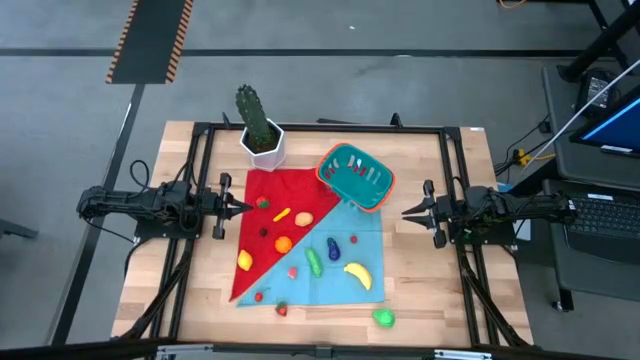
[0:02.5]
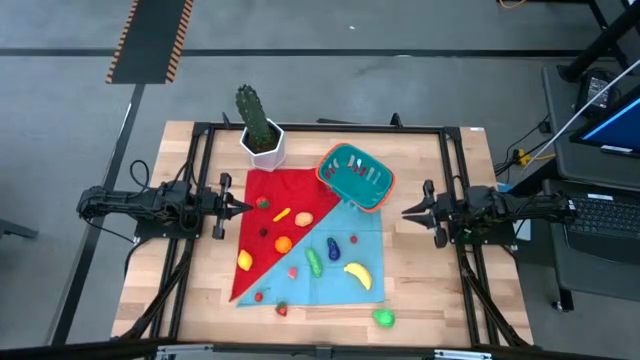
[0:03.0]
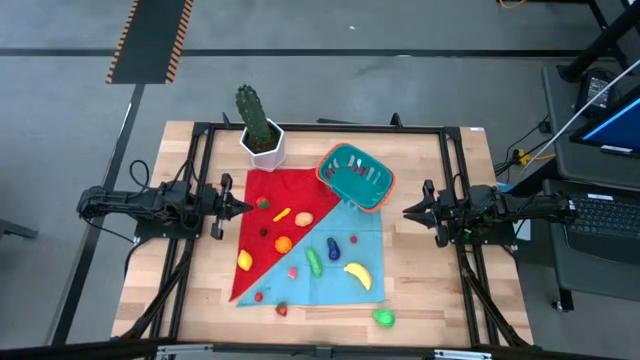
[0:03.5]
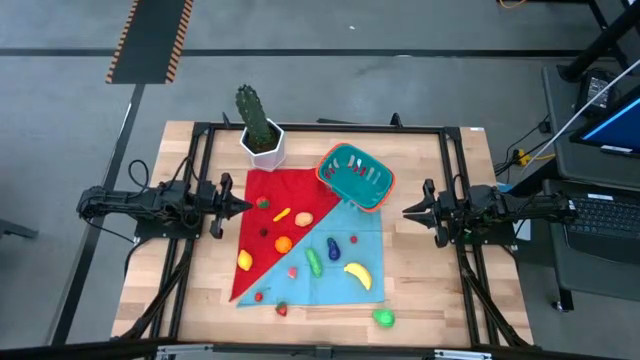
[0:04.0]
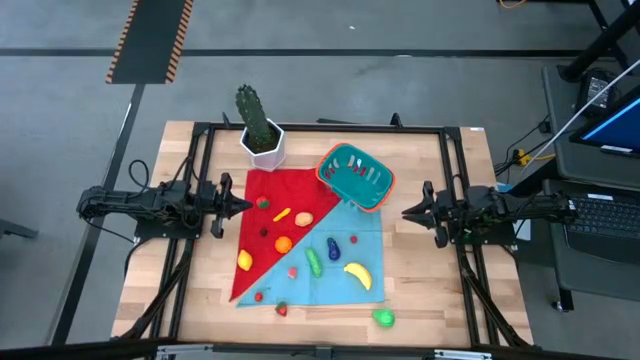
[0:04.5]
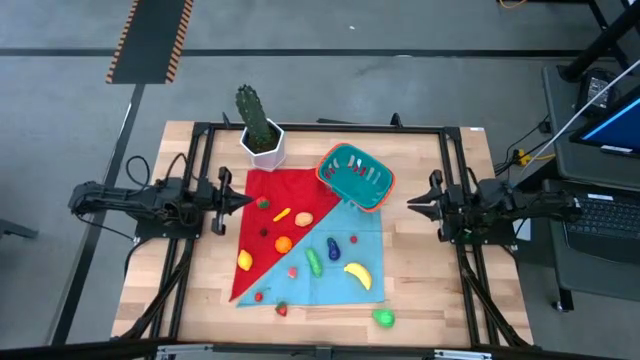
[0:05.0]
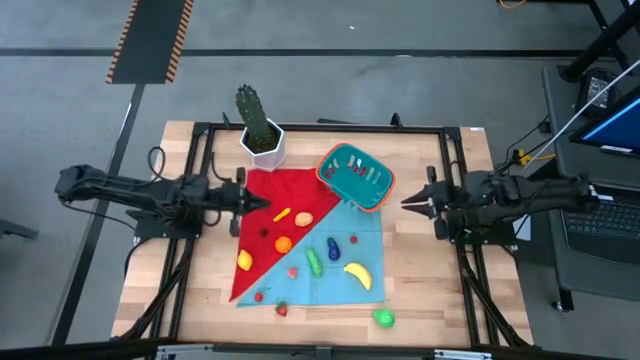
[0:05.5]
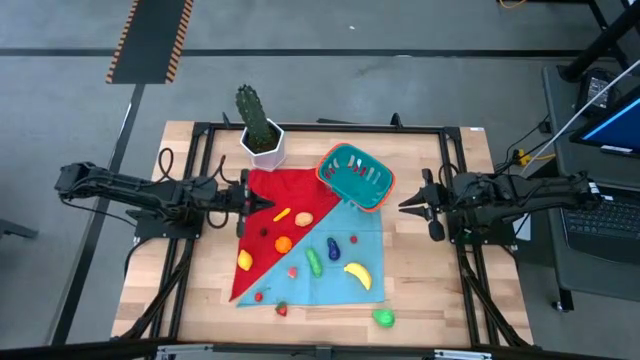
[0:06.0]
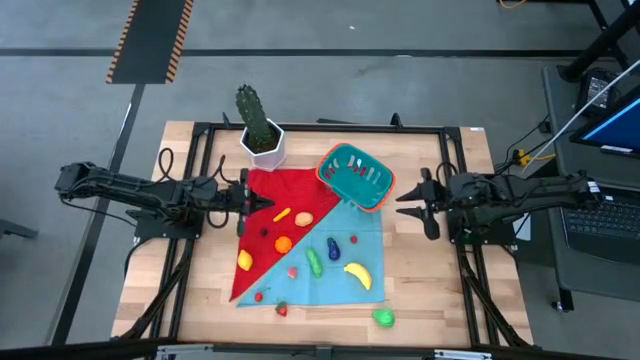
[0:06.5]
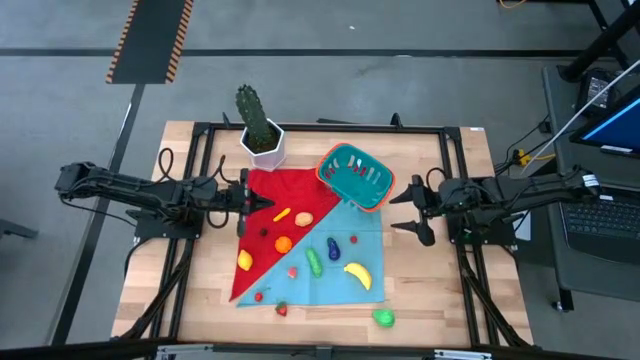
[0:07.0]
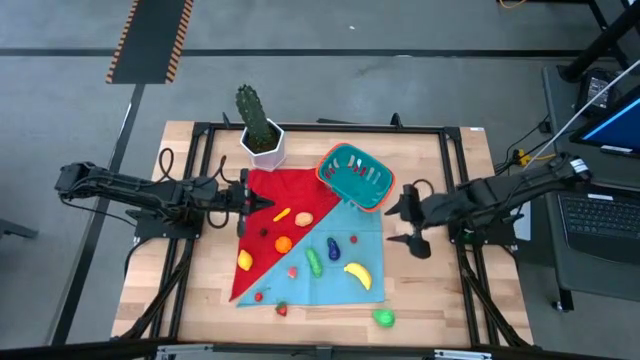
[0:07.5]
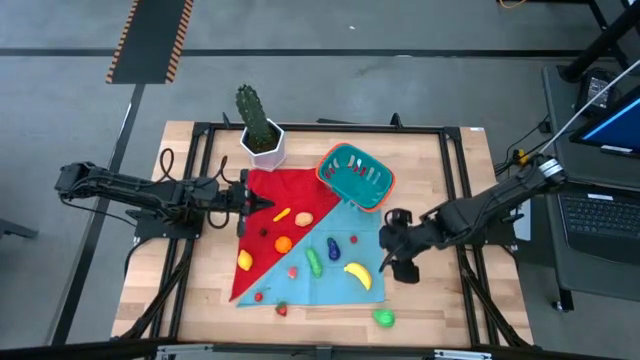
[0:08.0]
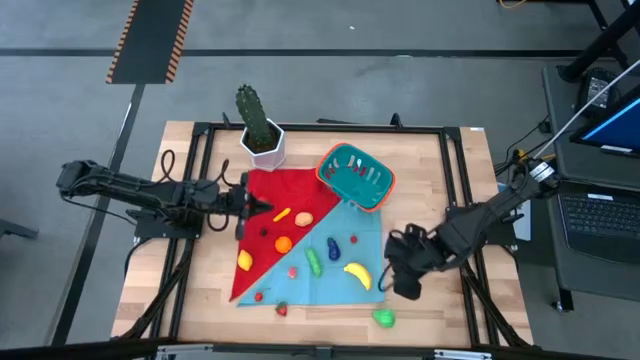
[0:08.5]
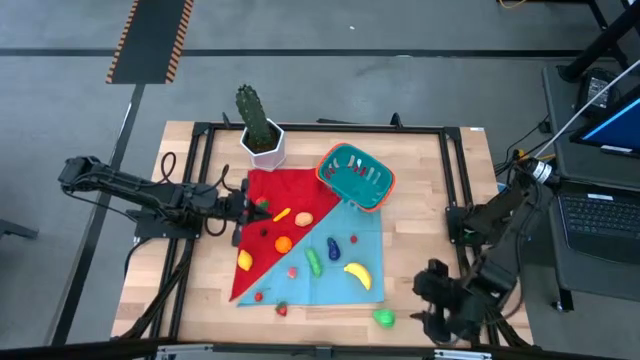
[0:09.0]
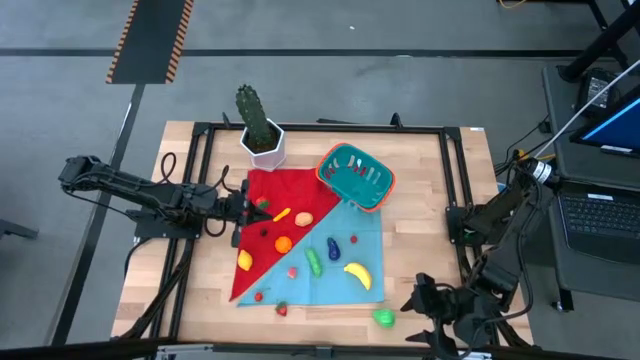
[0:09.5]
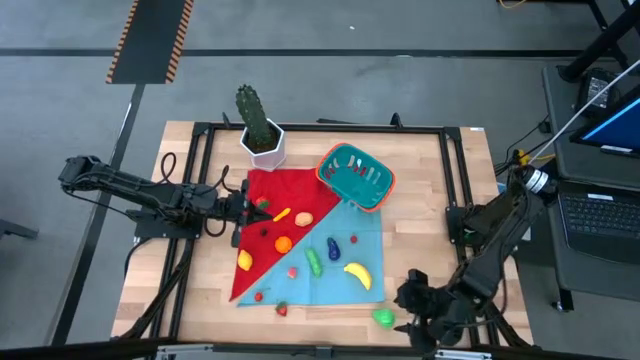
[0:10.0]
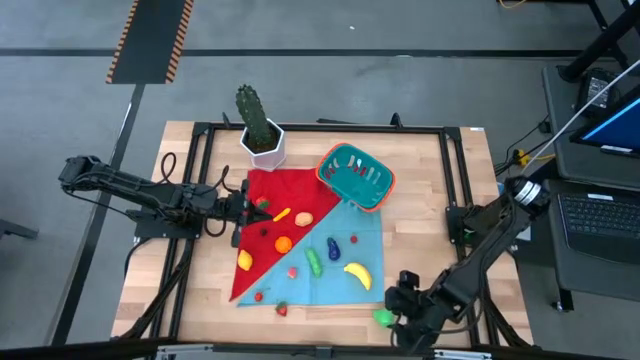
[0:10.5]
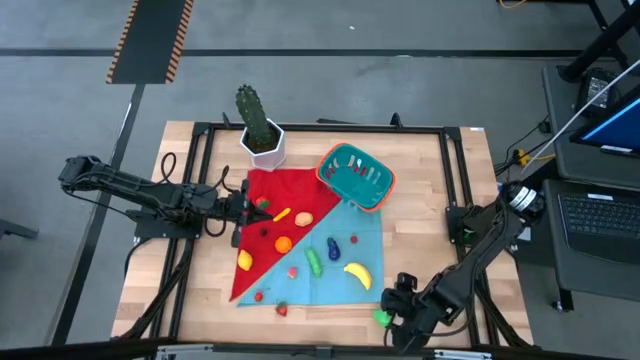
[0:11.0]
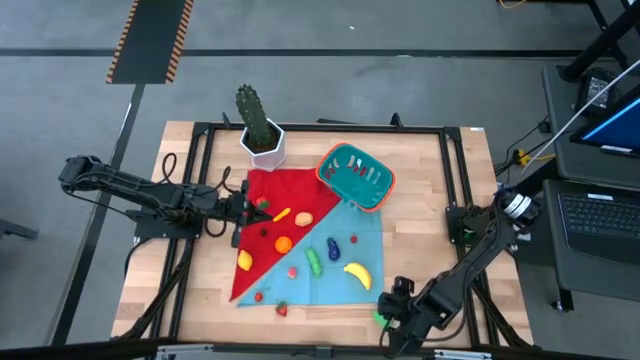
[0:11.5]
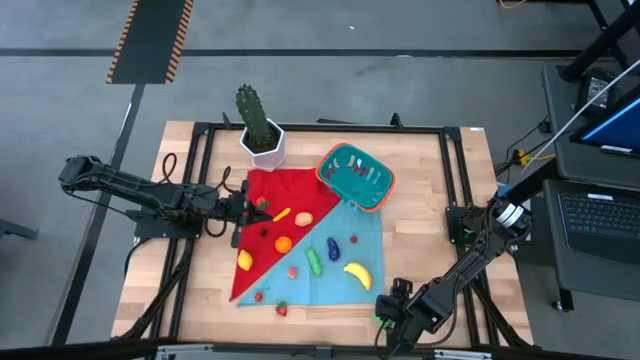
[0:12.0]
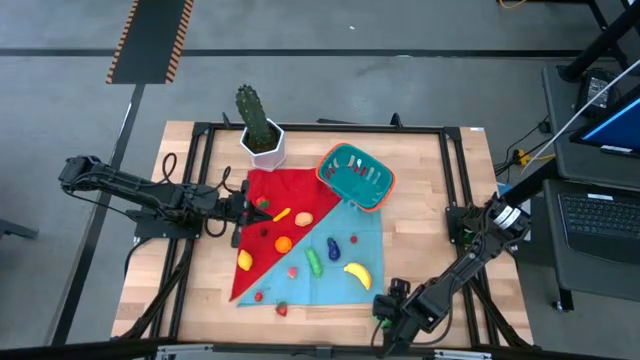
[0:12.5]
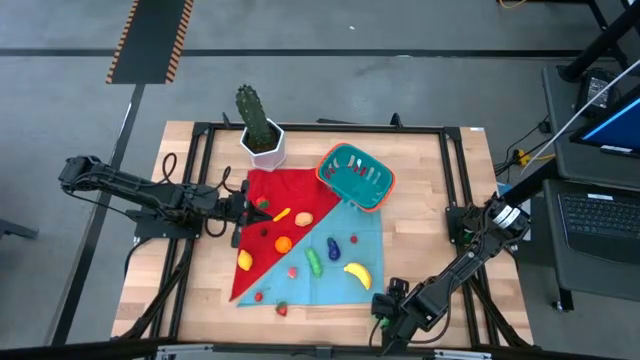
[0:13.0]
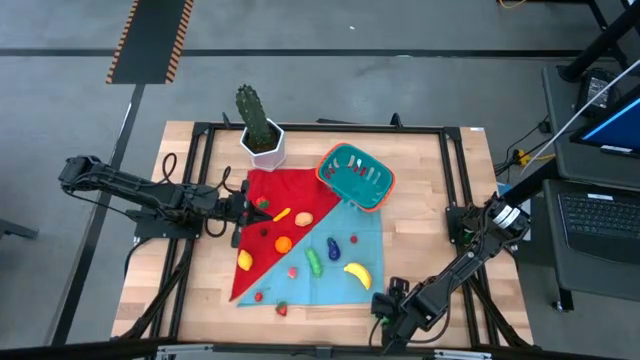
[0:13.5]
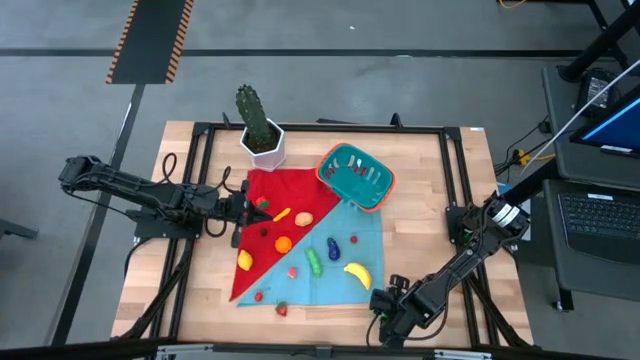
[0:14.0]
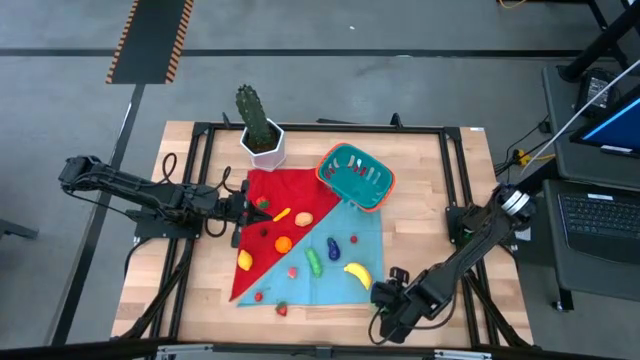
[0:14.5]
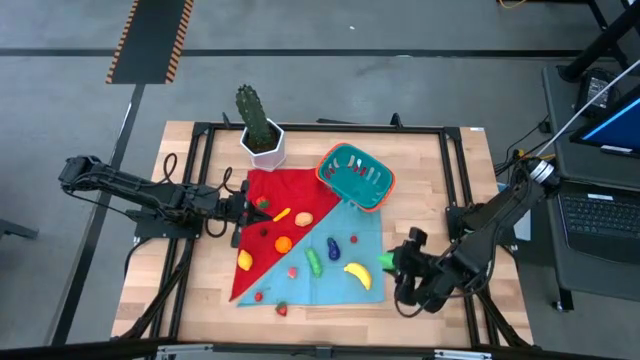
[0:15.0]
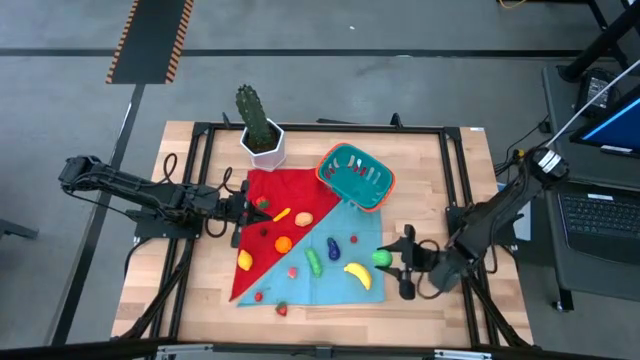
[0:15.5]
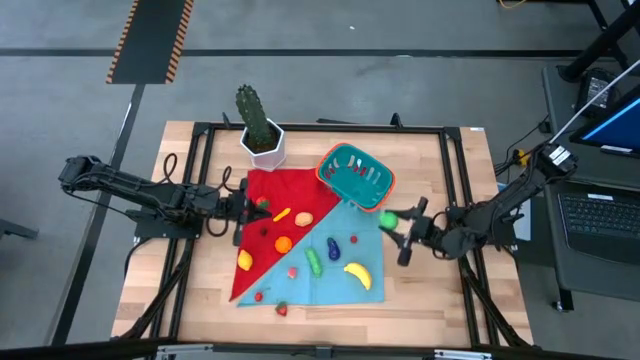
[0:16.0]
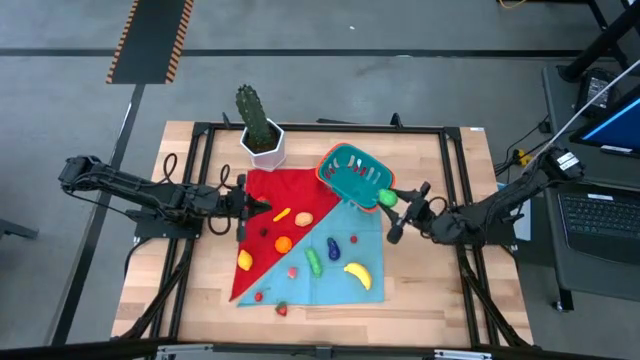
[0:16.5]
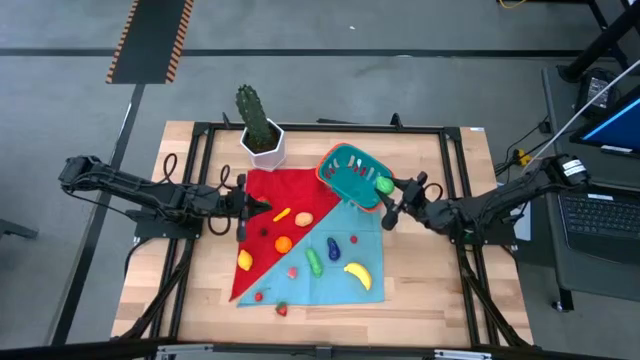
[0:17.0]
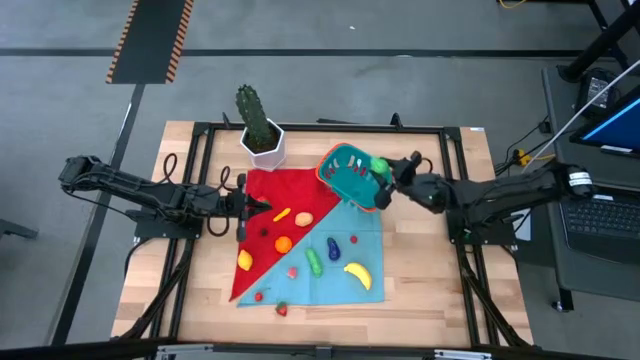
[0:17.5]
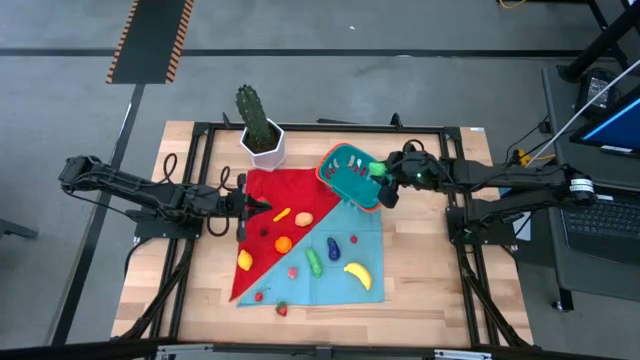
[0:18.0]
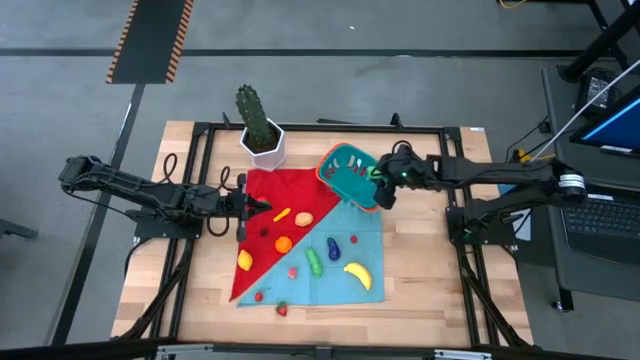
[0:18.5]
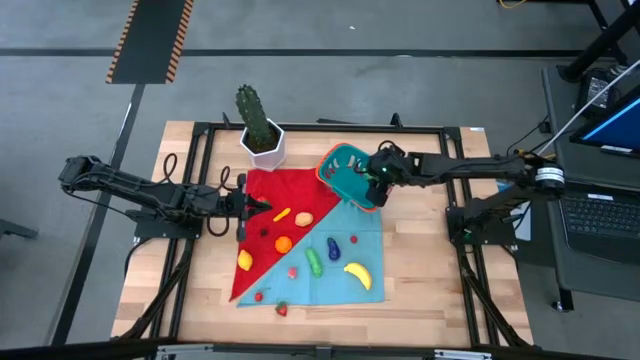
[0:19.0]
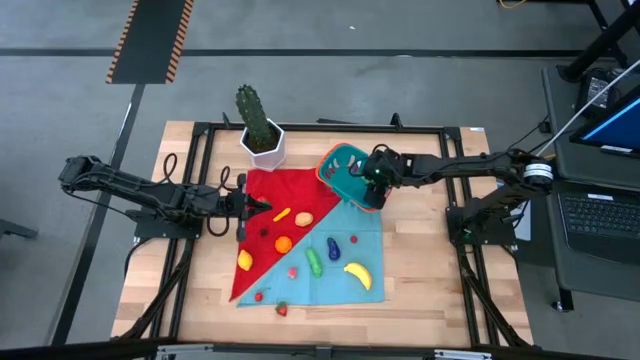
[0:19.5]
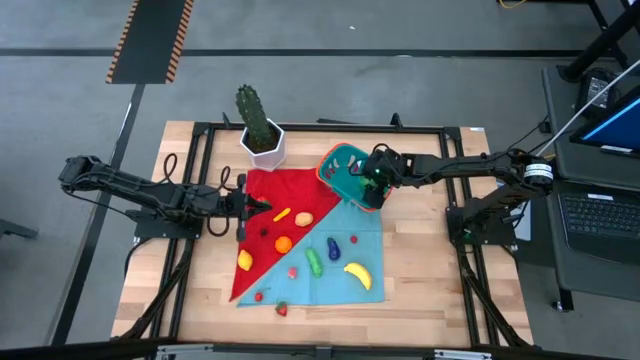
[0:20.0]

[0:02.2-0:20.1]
Task: Build produce basket
Put the green pear into the blue basket

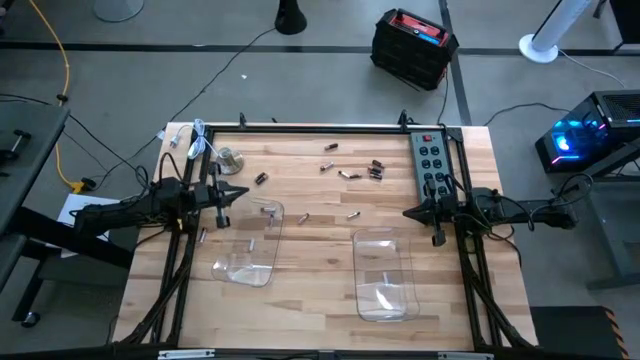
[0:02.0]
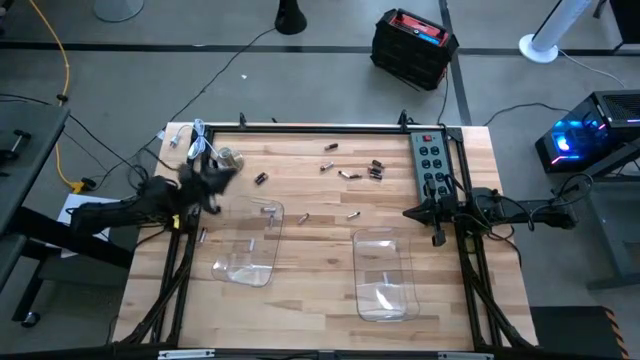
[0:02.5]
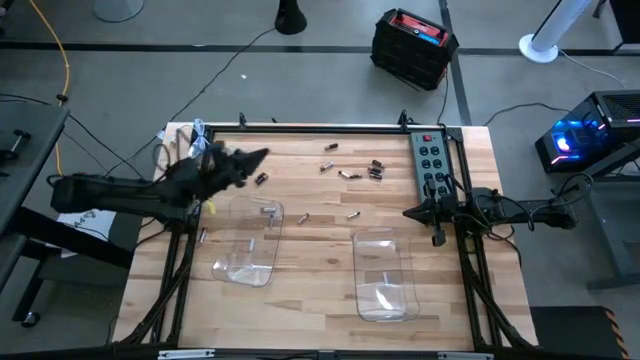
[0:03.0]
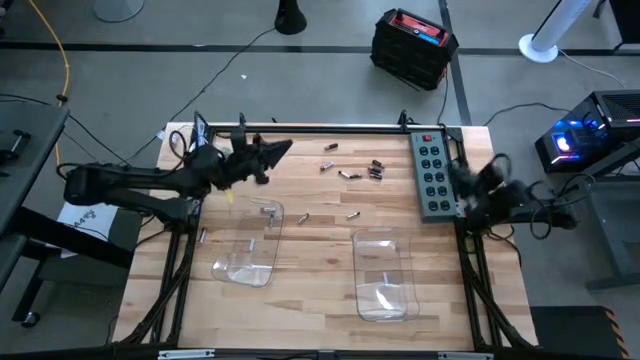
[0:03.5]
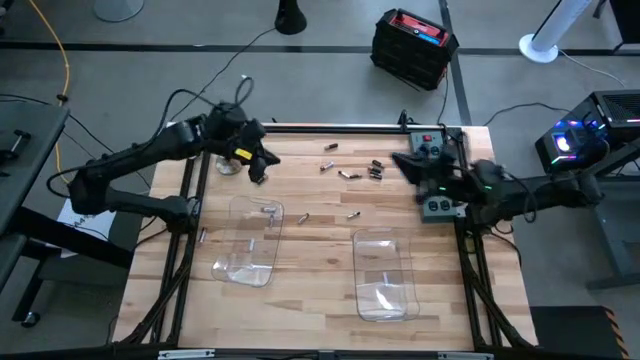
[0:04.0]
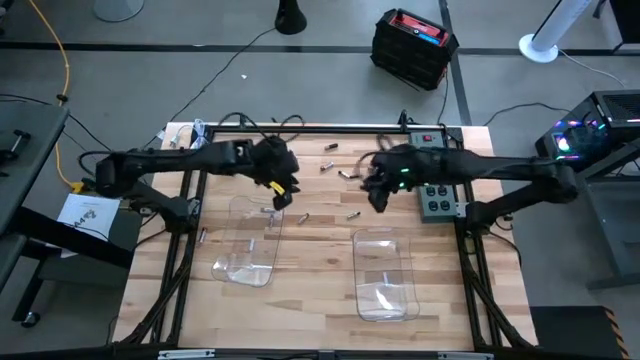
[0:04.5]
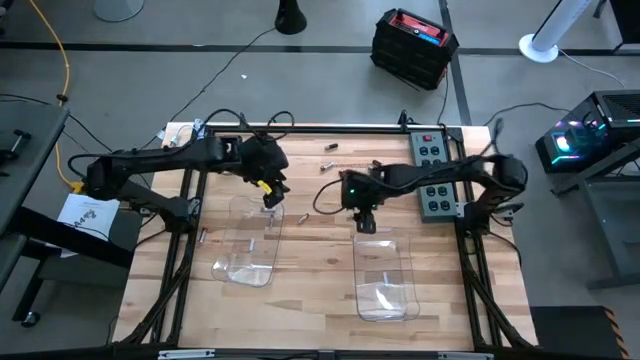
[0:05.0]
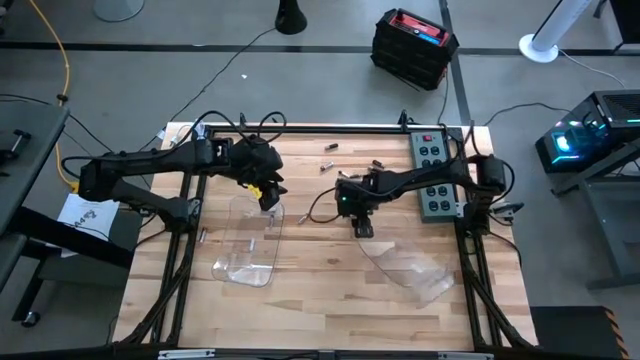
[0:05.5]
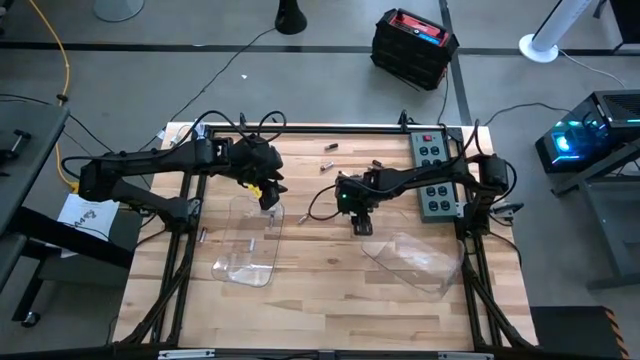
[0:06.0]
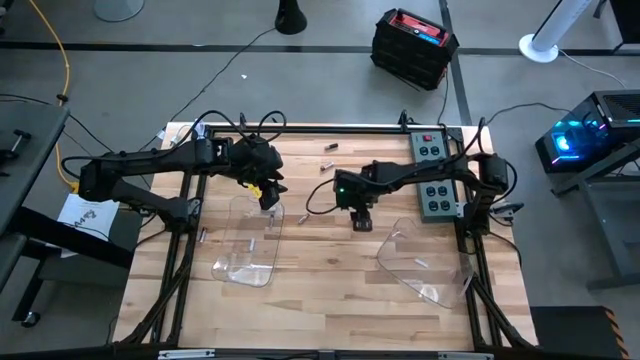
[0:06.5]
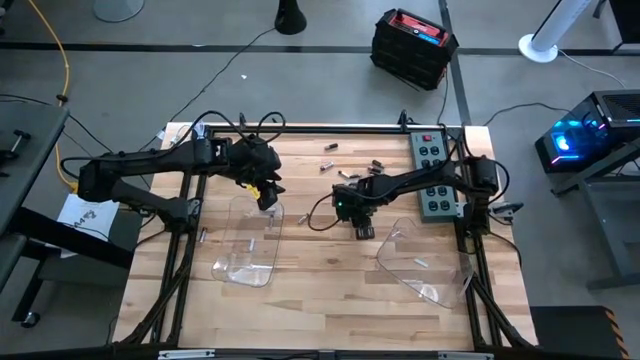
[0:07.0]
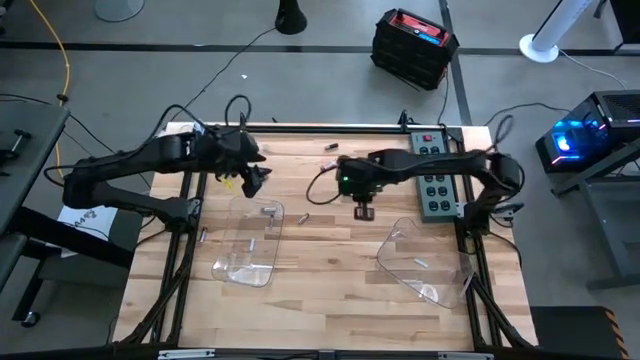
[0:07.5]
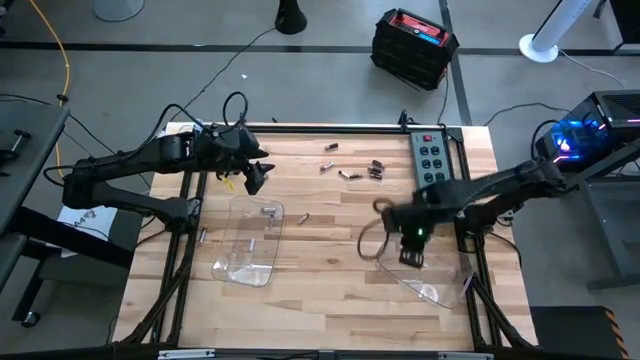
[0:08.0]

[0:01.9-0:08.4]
Task: Sort batteries
Put the silver battery into the left transparent bin
